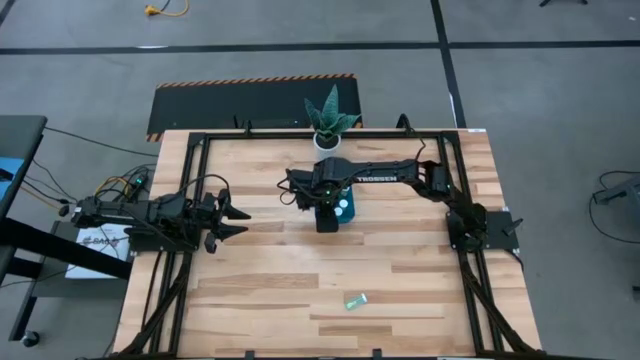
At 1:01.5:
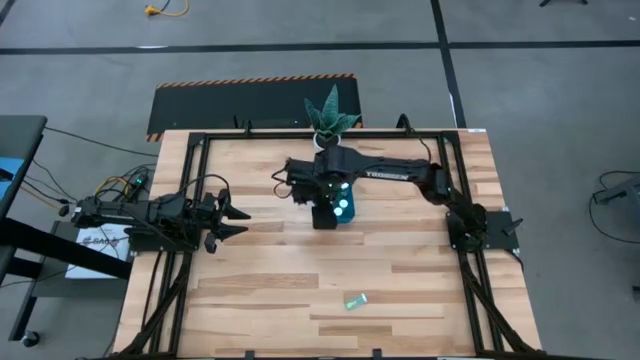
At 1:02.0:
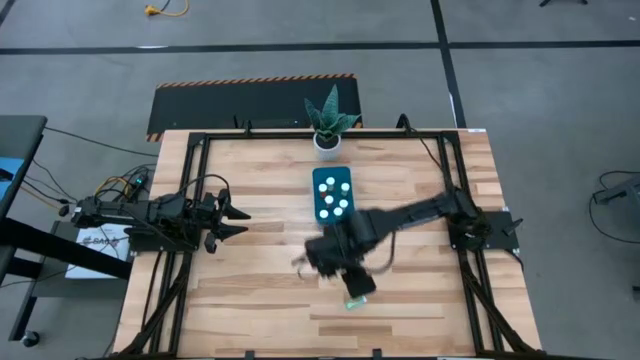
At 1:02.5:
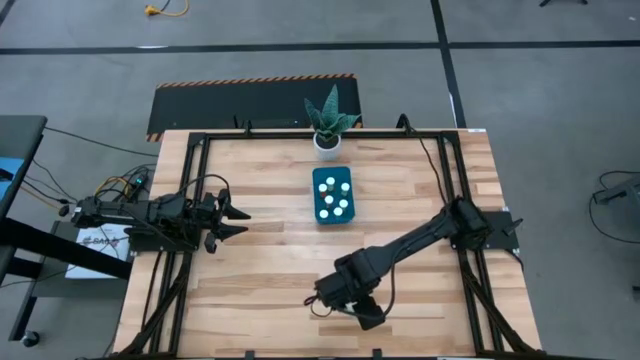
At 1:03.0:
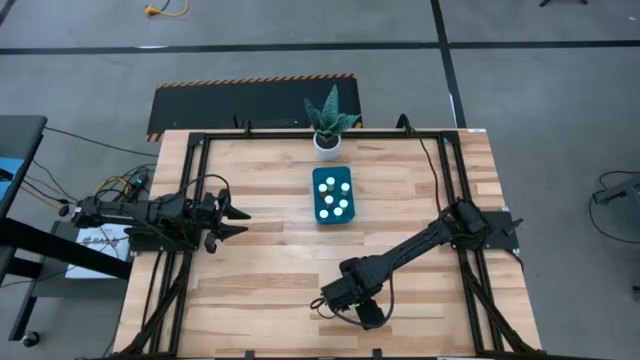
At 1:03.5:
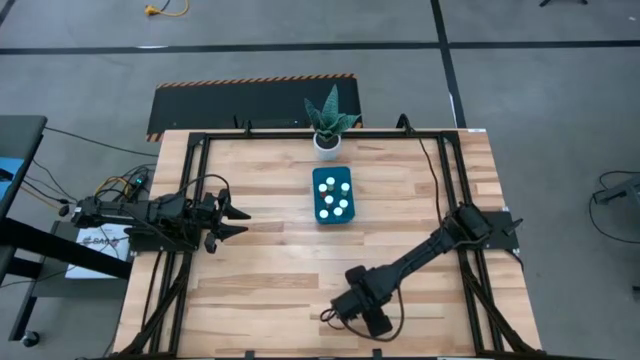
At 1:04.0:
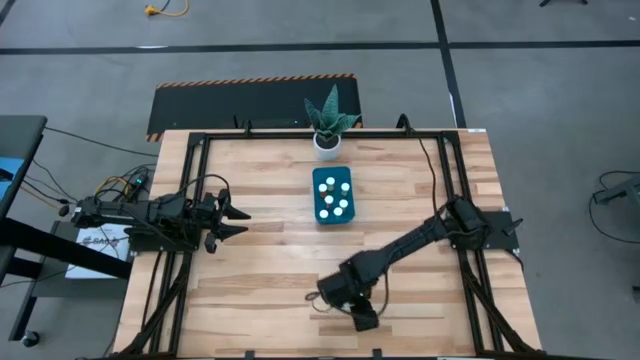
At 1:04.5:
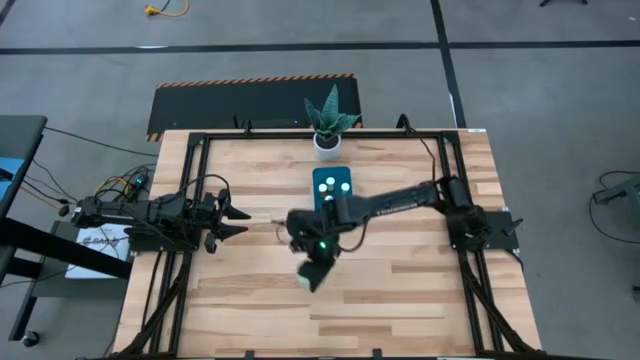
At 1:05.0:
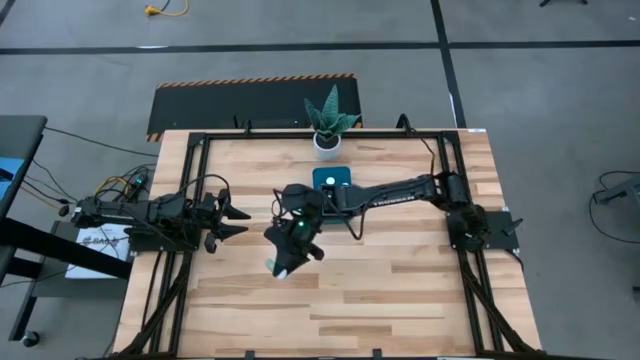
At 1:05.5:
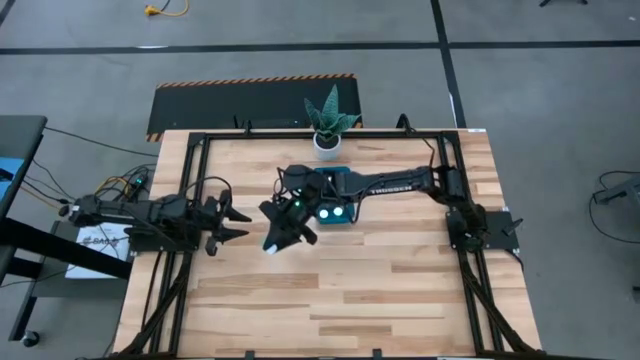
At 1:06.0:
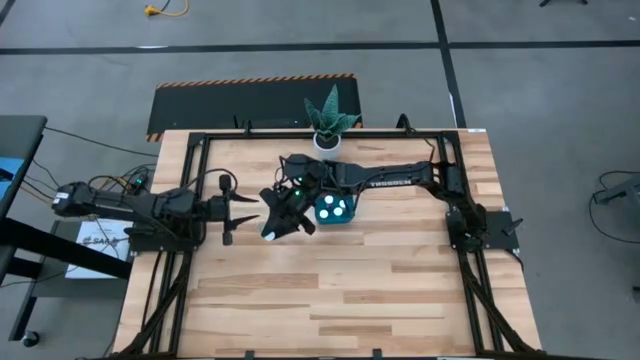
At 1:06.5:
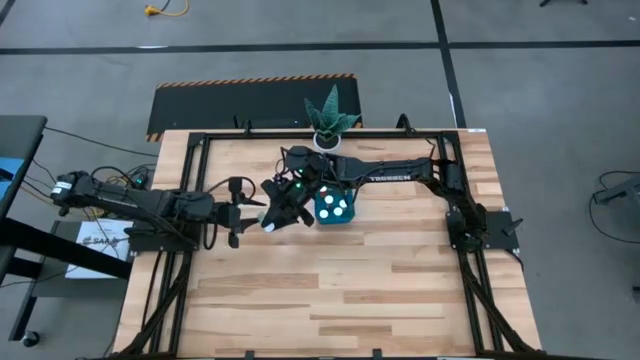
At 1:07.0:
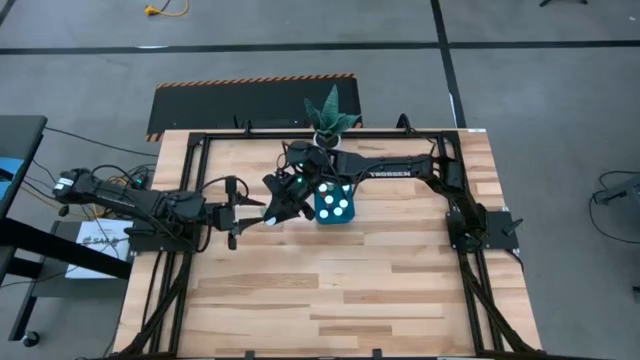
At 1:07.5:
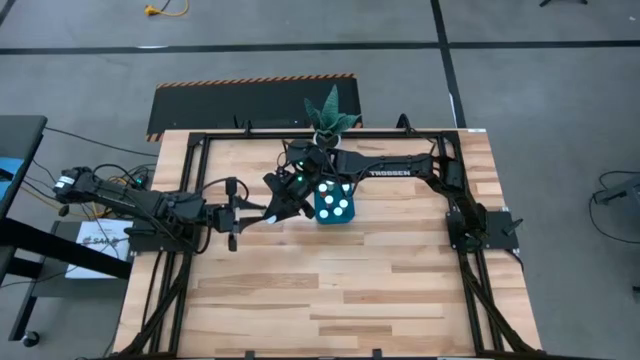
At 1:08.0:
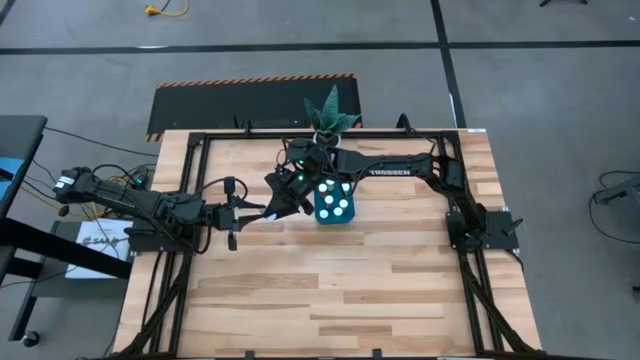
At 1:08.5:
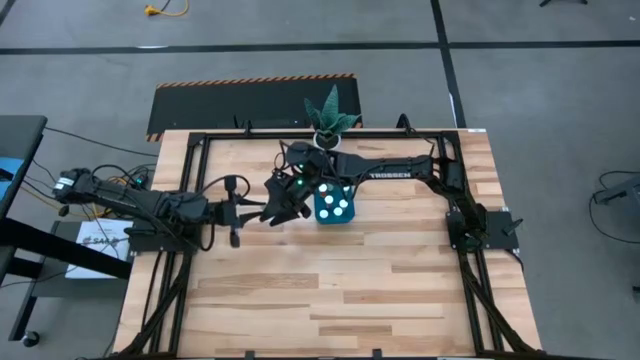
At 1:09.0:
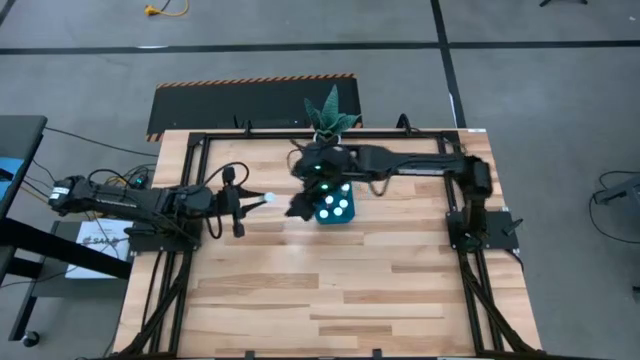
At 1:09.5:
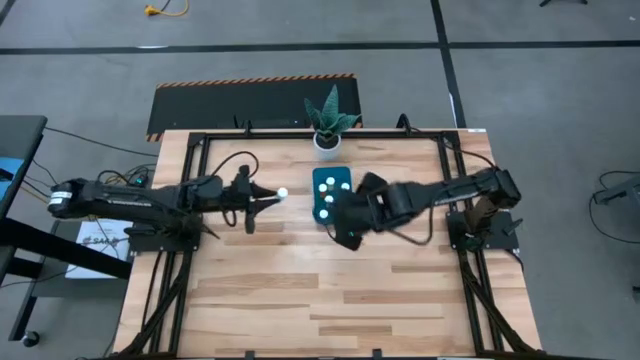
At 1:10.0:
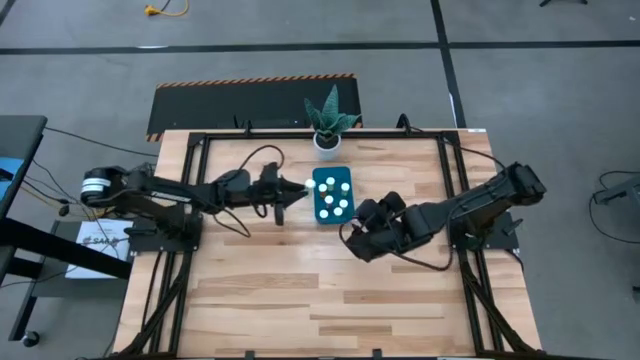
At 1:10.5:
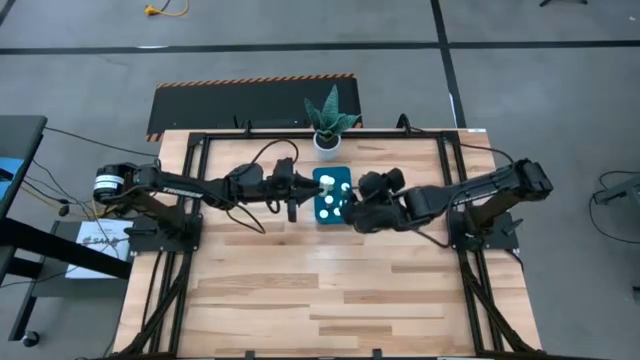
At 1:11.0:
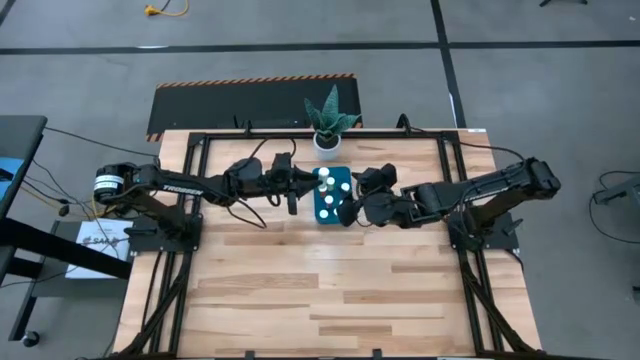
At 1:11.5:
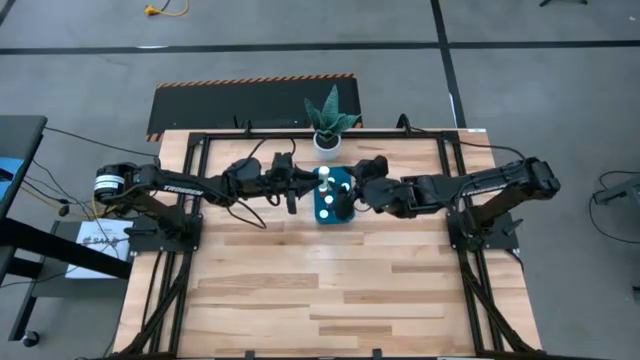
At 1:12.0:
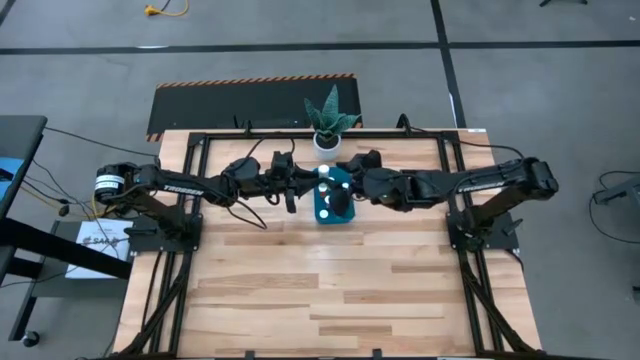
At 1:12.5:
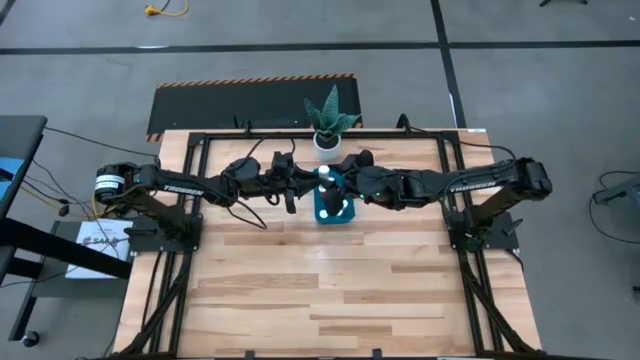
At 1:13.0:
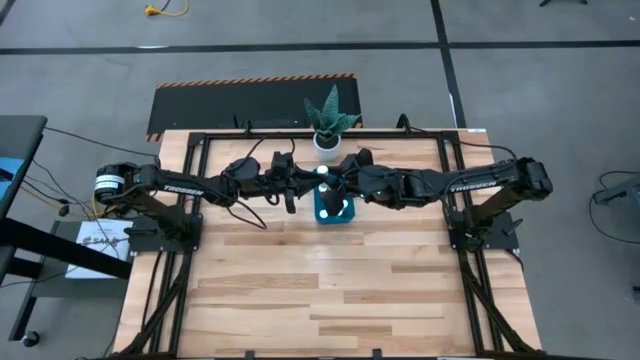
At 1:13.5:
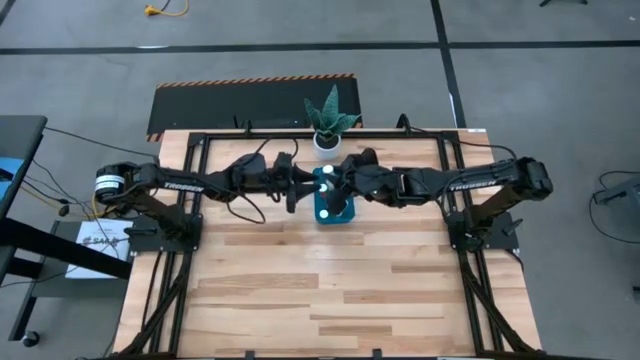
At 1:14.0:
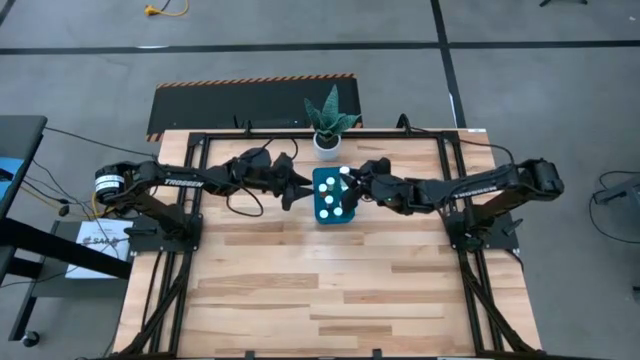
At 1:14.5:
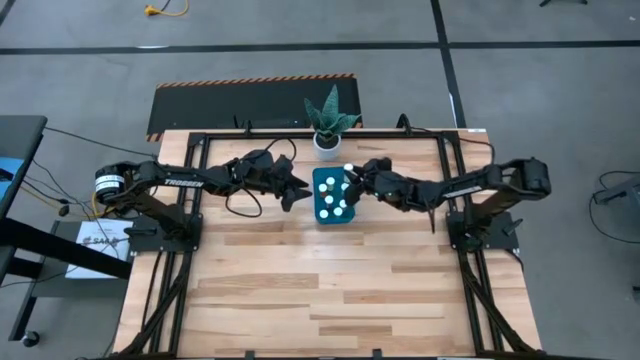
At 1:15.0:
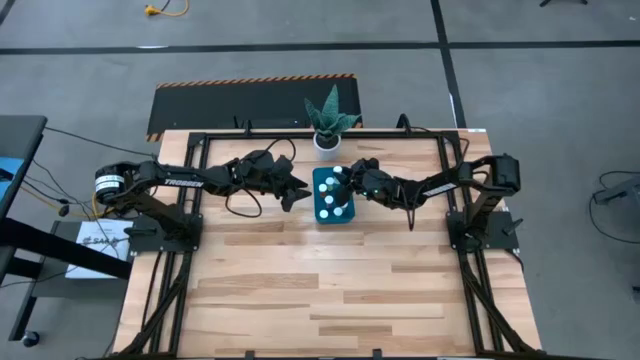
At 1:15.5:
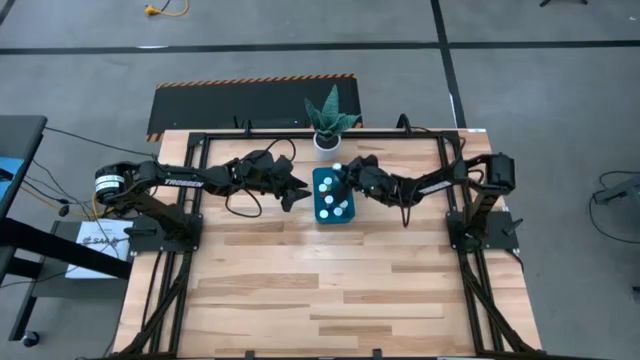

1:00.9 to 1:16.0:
Task: Pick and place pill bottles into a basket
Put the blue pill bottle into the blue bin

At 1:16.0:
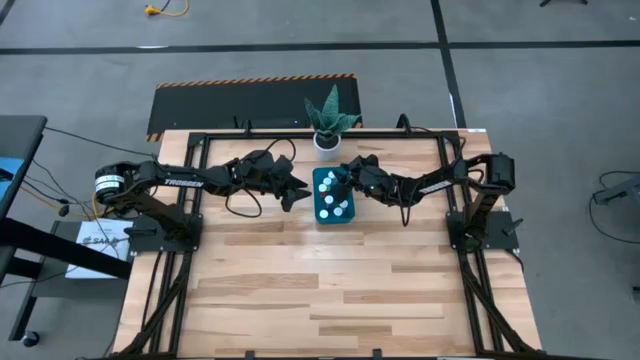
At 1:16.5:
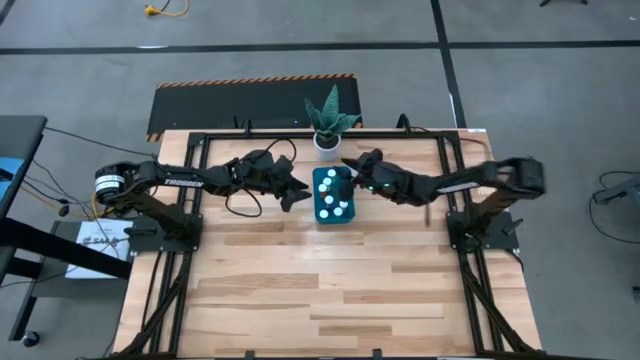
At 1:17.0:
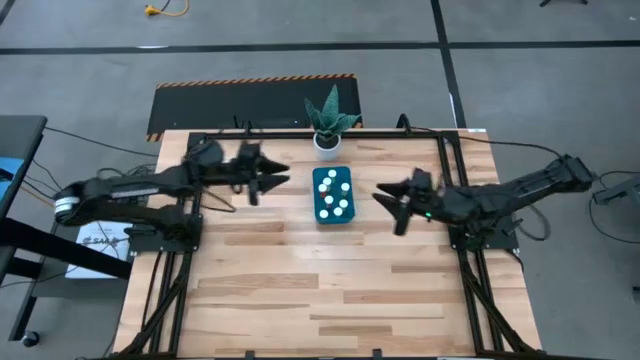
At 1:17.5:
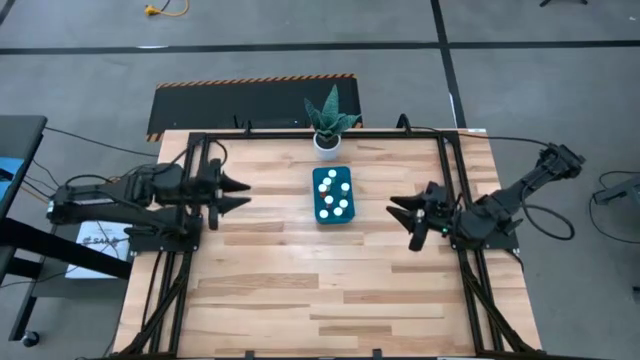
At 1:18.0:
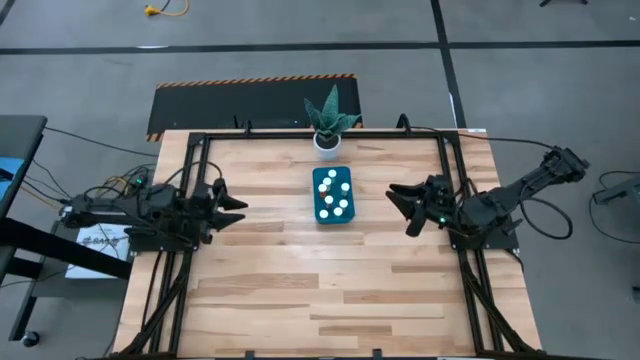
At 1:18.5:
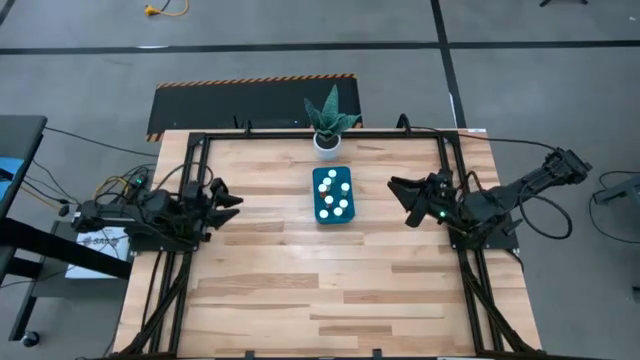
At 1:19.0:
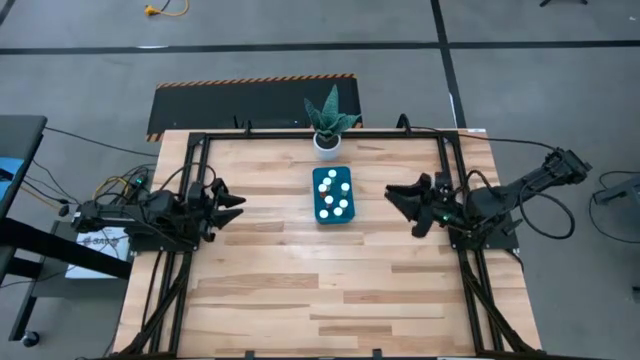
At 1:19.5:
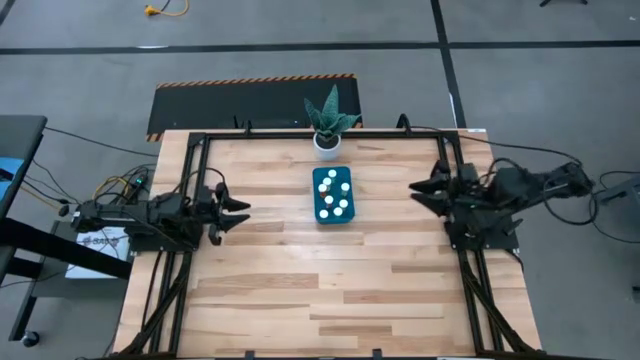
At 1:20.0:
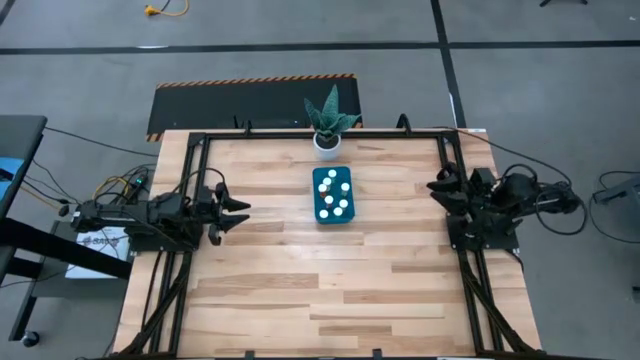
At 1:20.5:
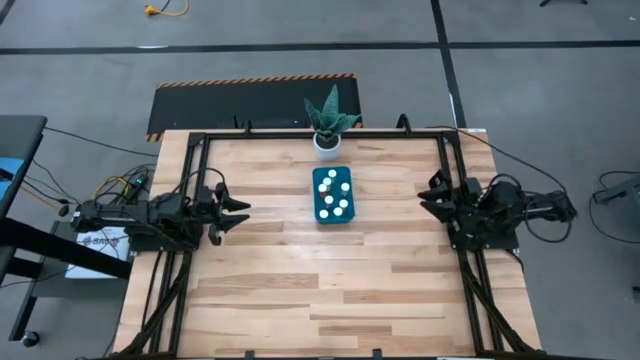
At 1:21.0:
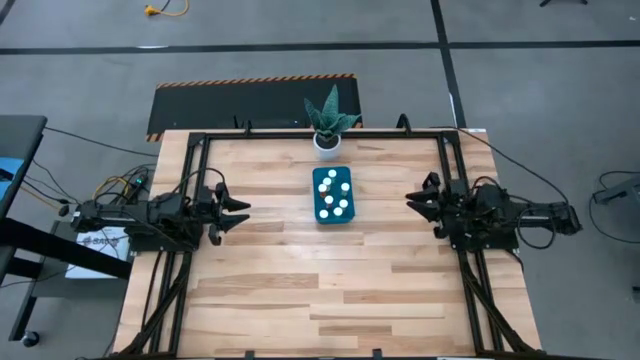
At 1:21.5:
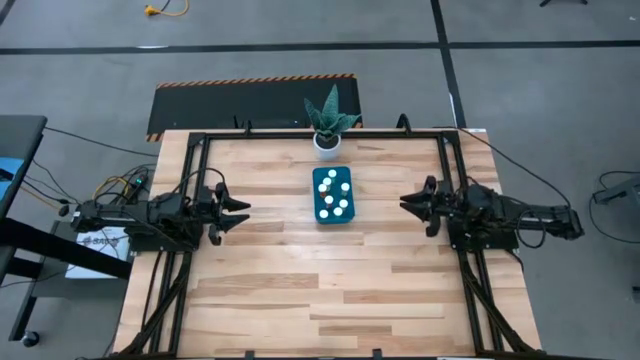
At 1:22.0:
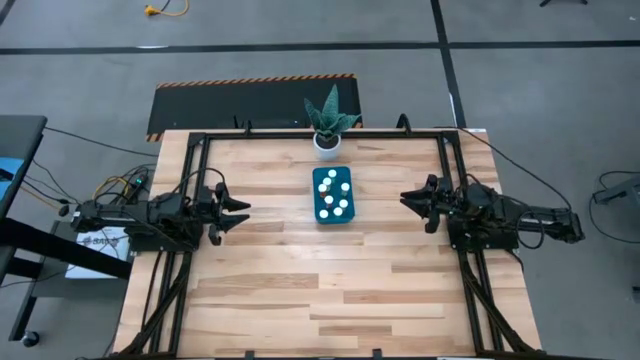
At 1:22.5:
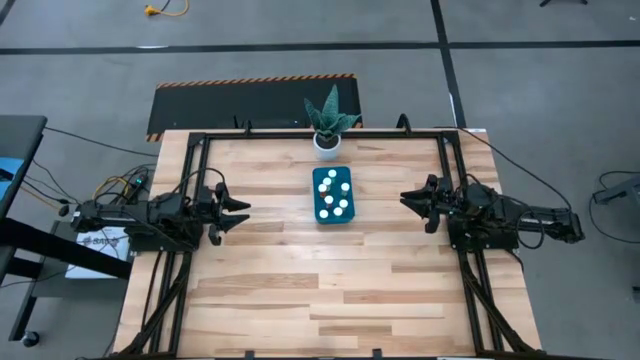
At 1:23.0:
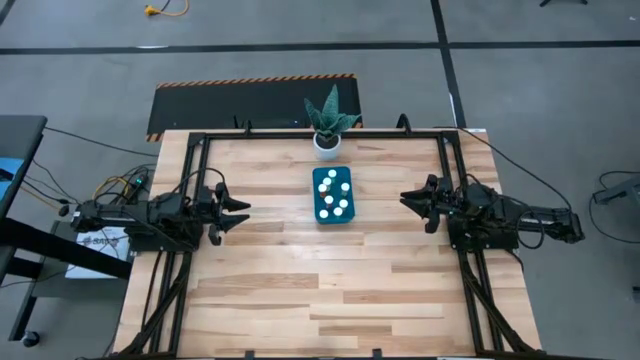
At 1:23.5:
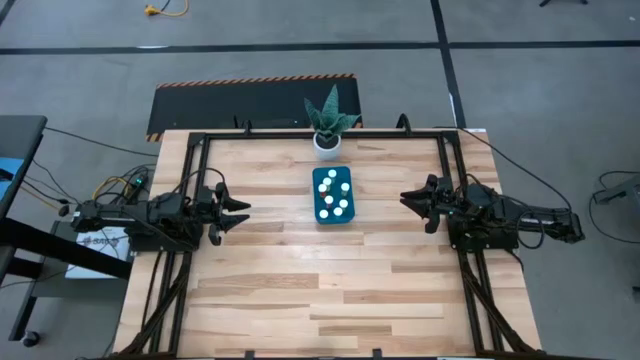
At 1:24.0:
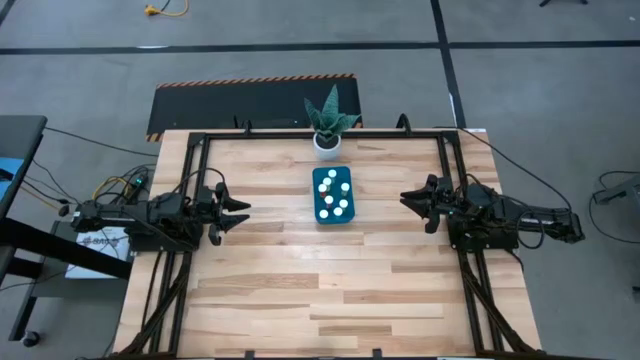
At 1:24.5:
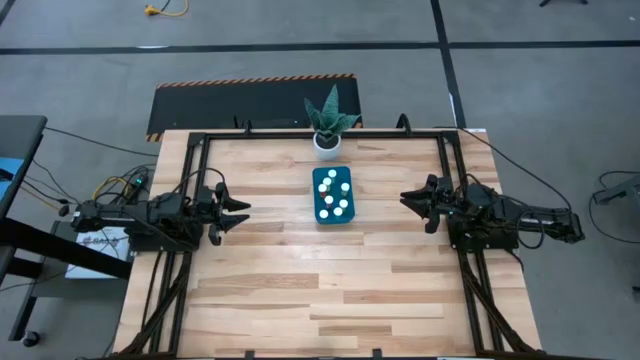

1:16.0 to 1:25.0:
Return to Home Position
